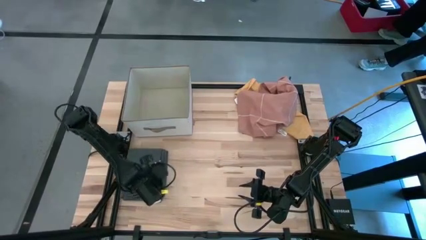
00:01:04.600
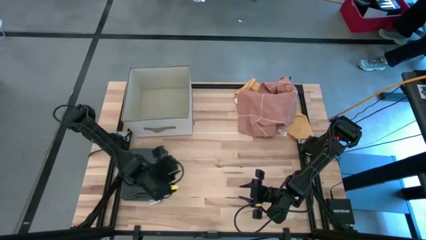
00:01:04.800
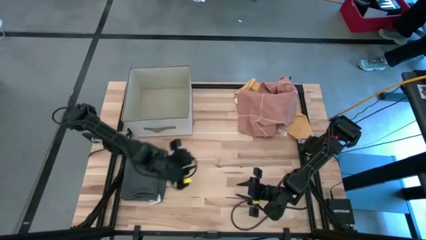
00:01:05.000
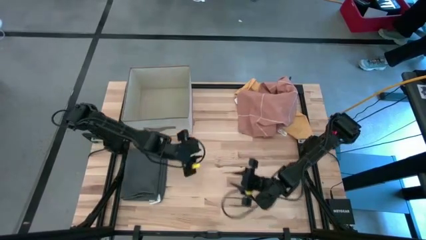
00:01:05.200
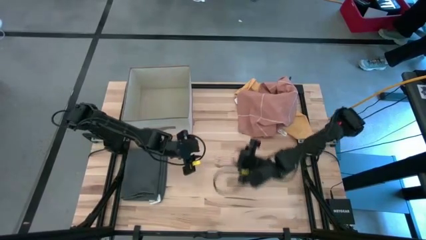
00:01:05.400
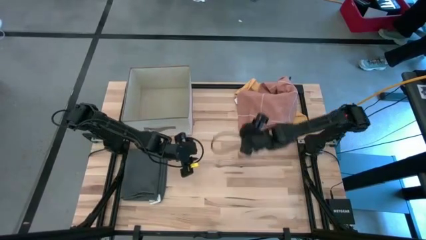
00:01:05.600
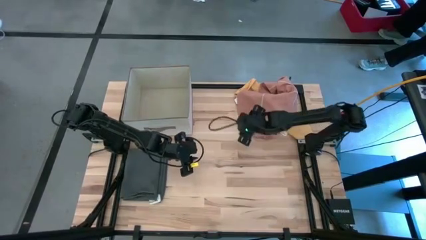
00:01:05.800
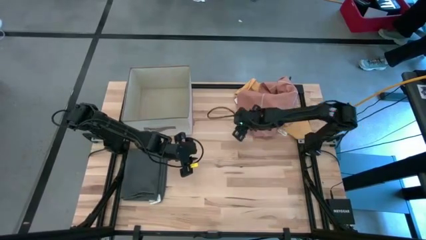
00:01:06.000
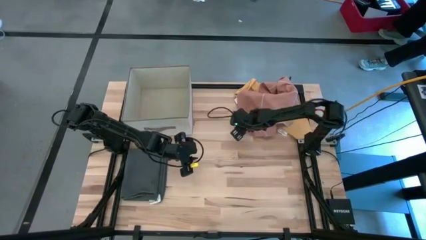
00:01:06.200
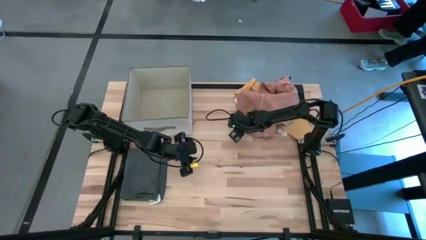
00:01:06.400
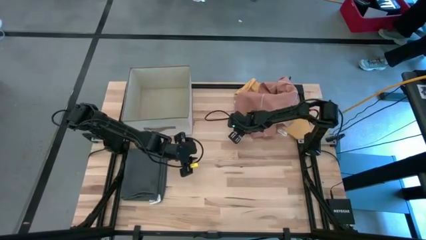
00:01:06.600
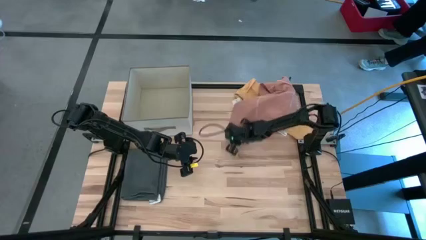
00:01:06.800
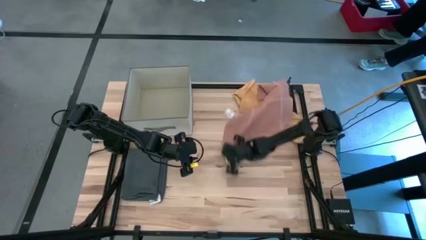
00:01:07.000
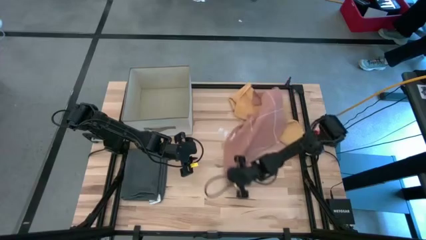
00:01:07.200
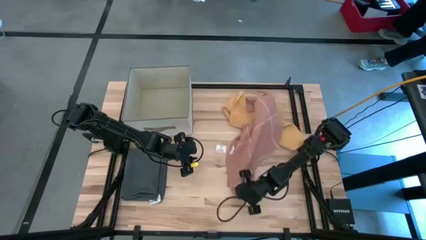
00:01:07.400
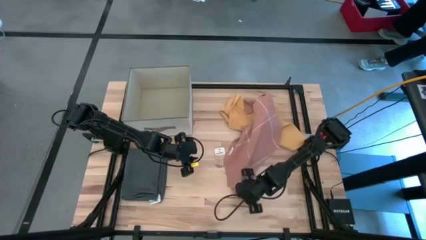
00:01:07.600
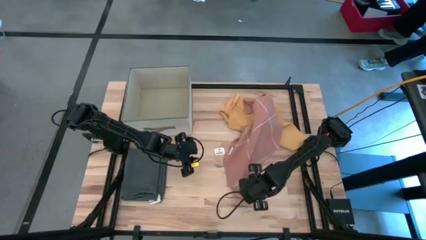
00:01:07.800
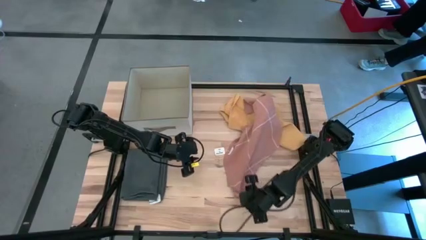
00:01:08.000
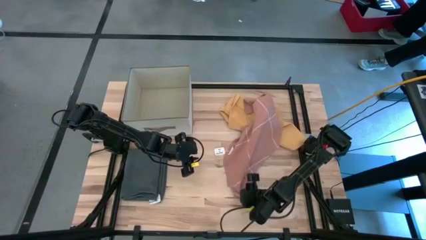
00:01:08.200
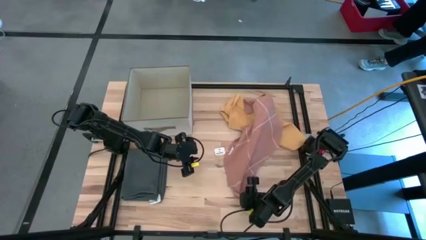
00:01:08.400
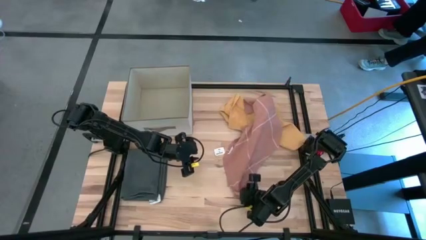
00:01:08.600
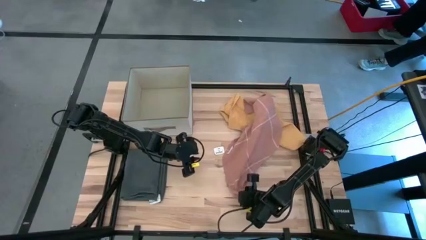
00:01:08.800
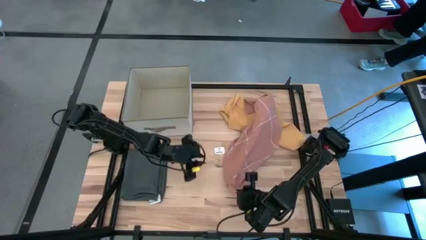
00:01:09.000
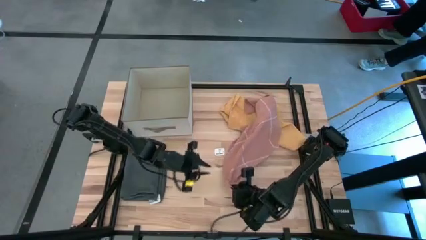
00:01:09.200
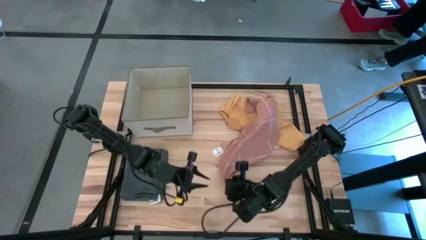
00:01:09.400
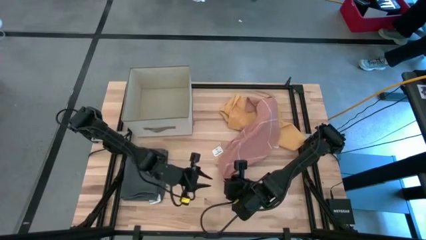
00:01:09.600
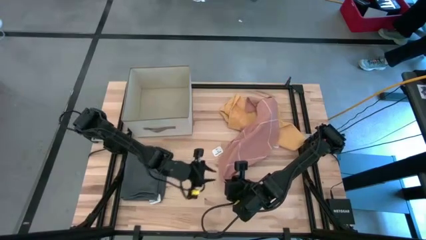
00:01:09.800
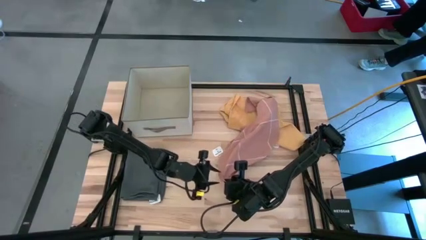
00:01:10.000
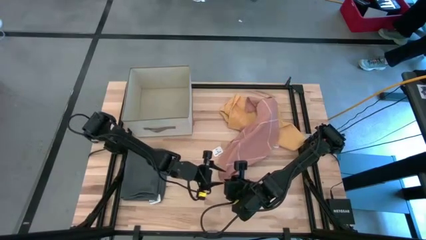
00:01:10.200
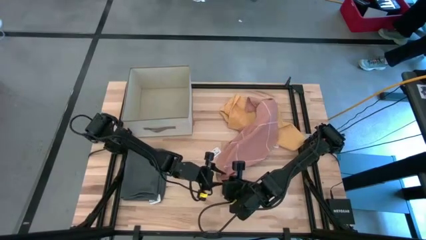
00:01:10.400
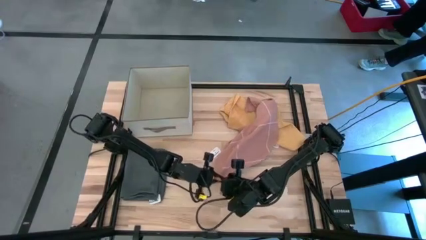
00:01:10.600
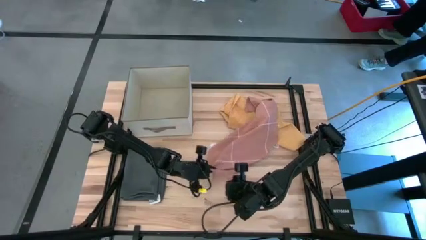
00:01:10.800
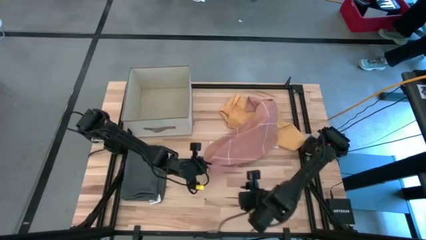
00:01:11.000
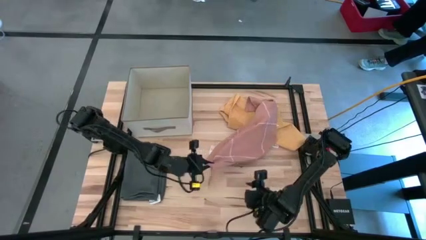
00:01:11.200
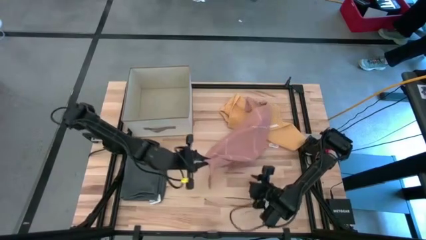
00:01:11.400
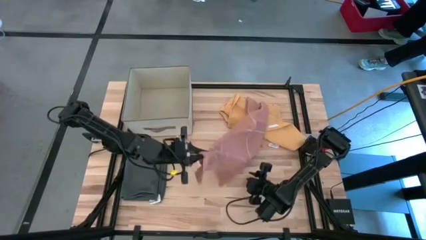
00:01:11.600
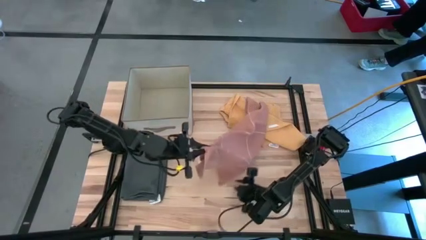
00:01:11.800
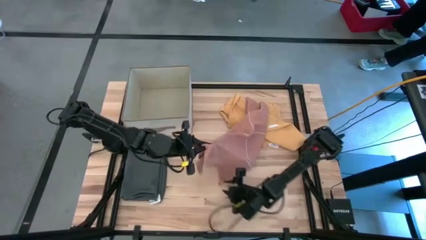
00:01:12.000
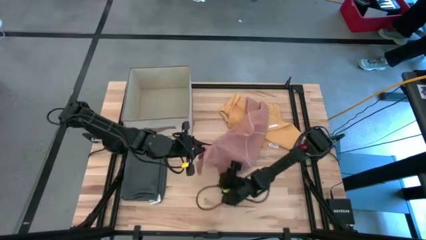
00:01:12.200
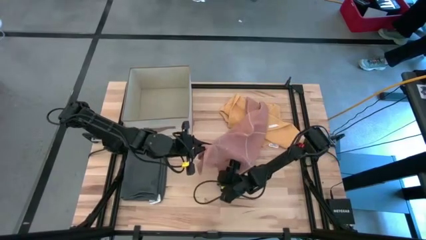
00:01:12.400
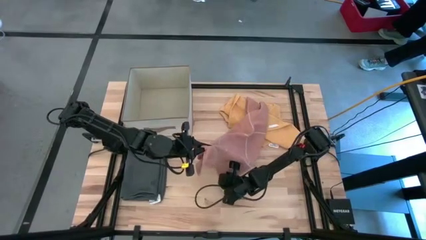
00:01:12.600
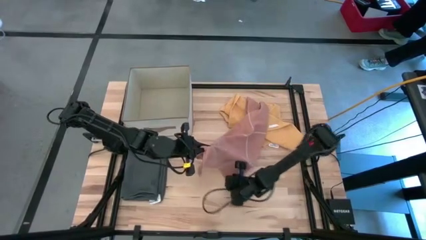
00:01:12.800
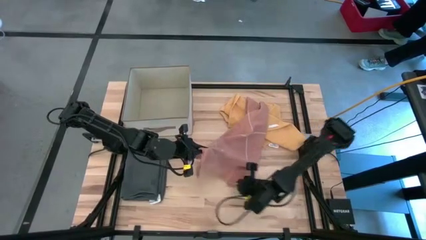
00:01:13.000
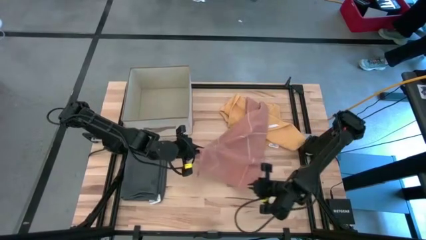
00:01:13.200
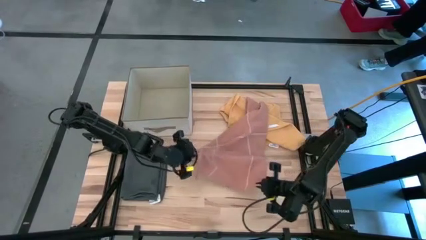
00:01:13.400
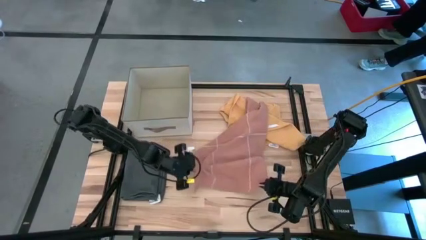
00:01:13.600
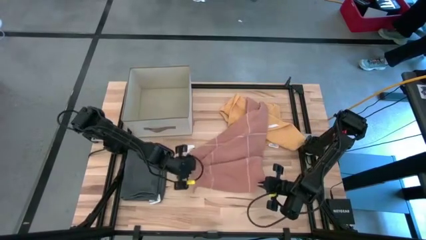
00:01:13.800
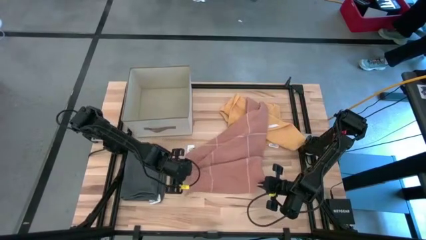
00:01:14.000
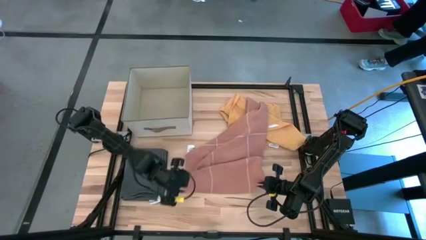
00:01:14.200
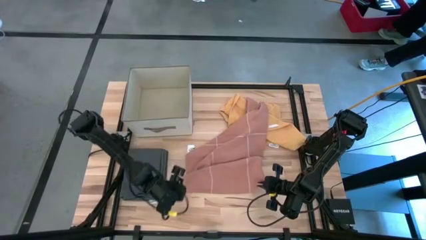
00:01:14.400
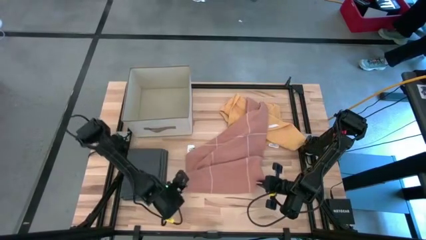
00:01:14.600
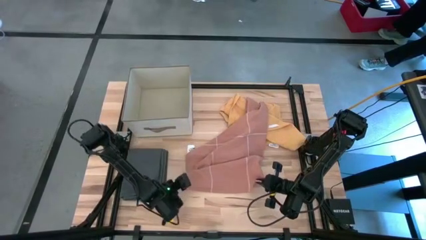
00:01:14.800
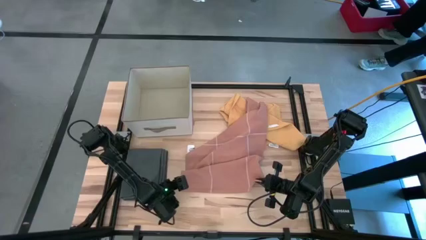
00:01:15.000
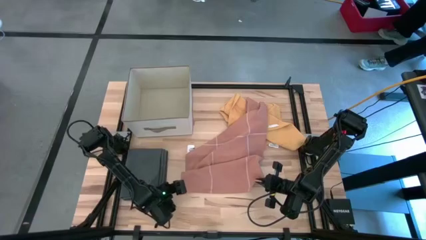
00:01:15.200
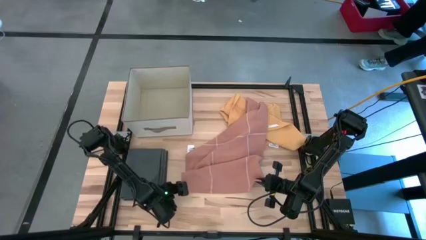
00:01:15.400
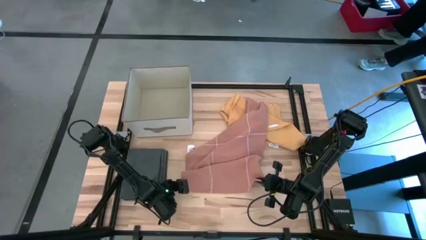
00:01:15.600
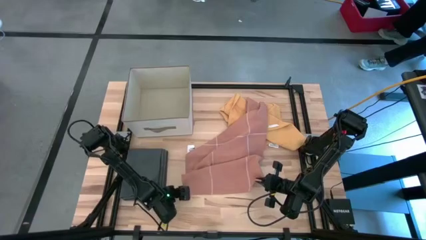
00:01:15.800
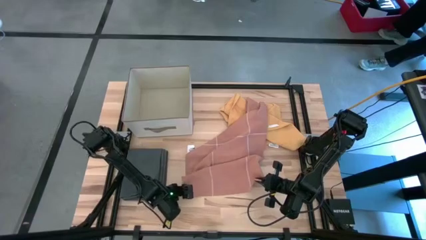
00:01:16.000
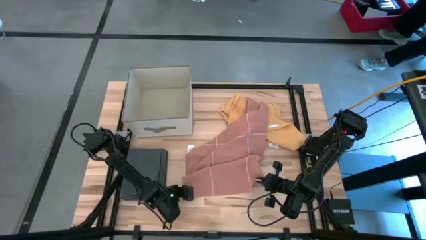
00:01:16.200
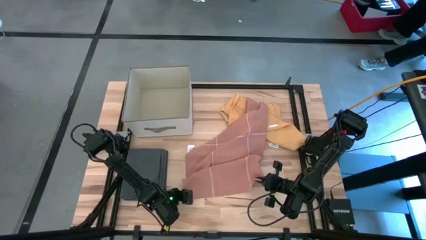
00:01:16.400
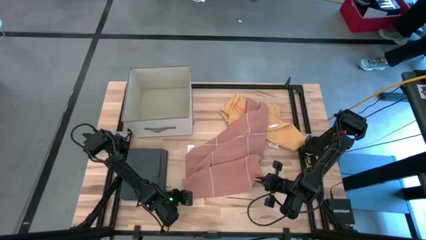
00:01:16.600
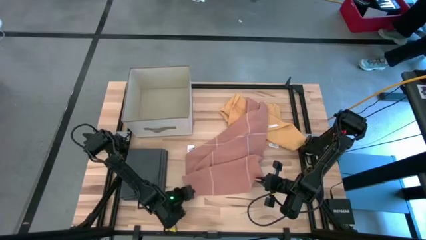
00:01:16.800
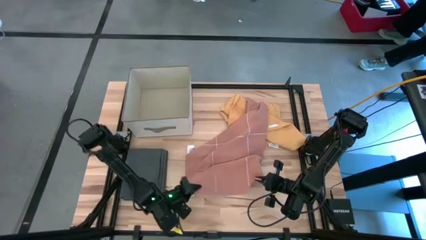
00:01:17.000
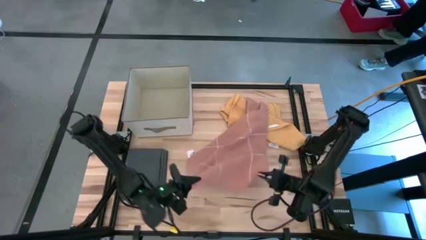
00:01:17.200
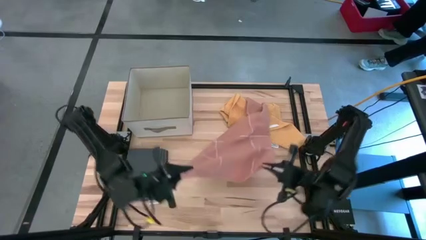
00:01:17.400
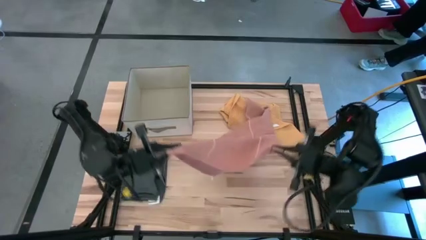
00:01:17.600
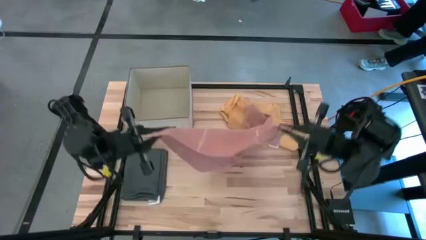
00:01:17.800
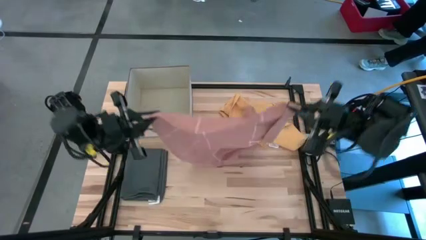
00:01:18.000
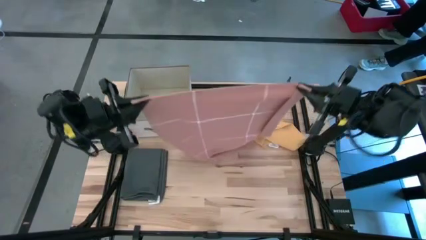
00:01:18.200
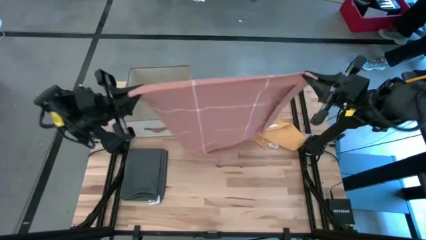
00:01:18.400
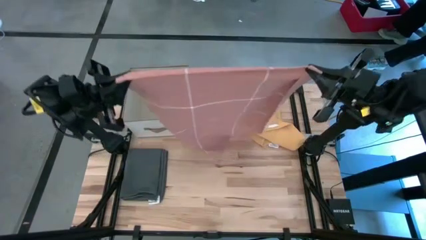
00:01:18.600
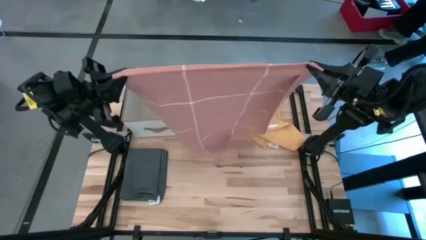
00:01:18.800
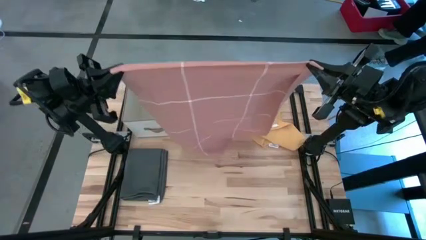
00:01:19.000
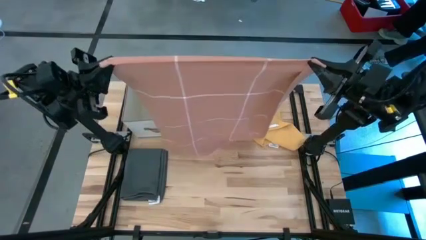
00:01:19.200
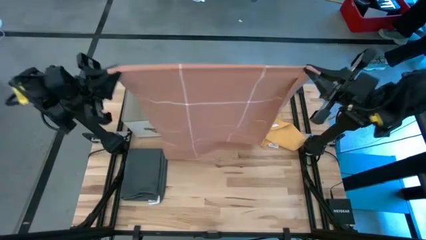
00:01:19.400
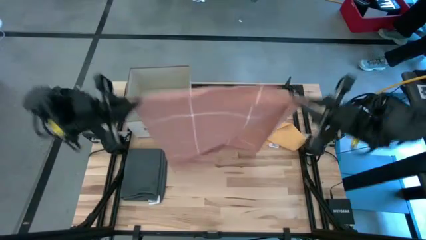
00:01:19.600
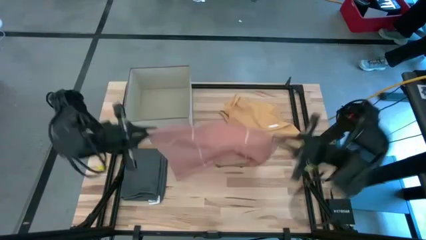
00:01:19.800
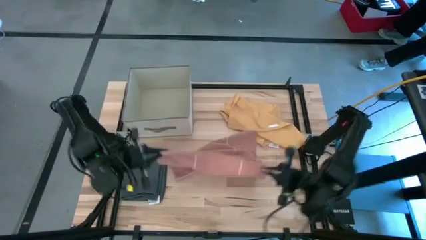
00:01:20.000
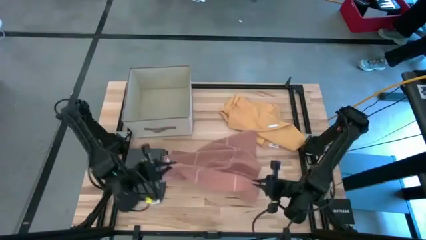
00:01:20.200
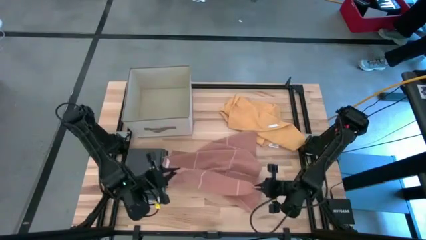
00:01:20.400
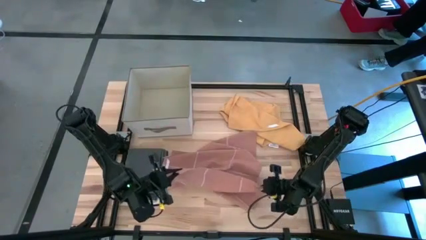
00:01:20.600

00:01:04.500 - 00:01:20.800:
Task: Fold towel
Fold the light orange towel
